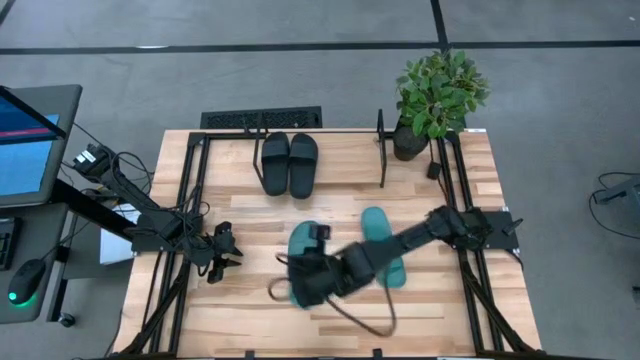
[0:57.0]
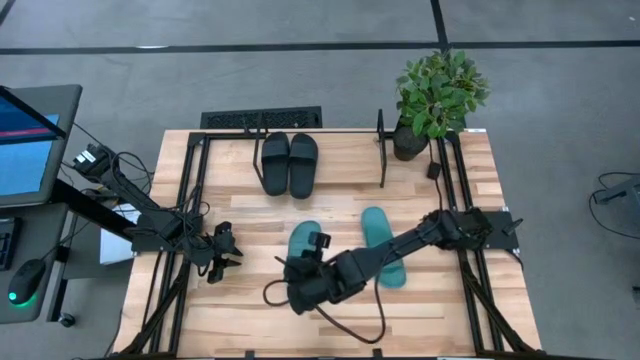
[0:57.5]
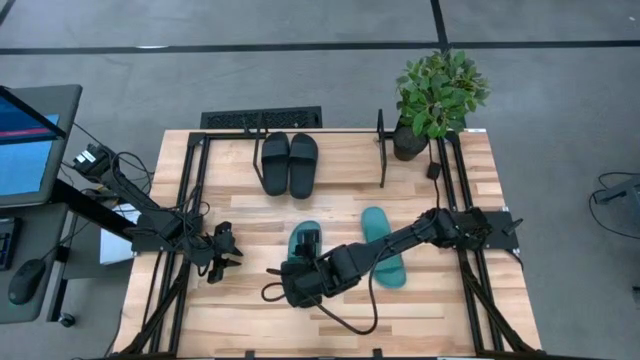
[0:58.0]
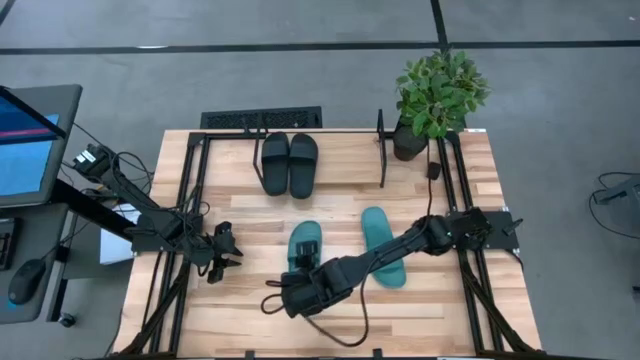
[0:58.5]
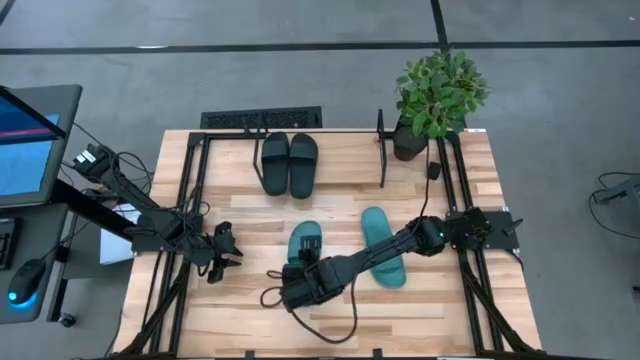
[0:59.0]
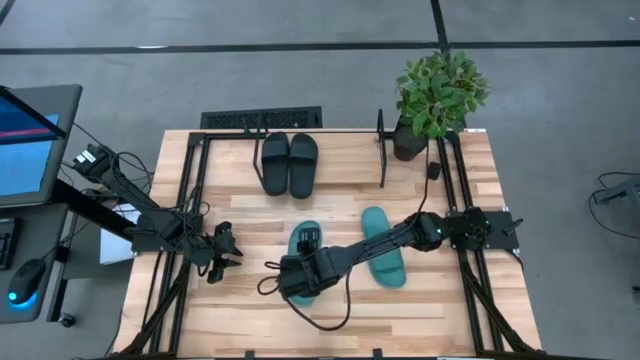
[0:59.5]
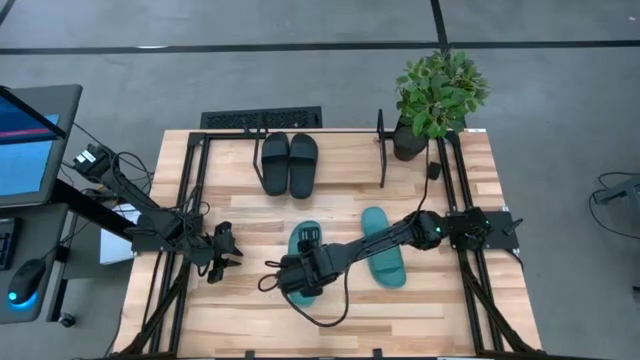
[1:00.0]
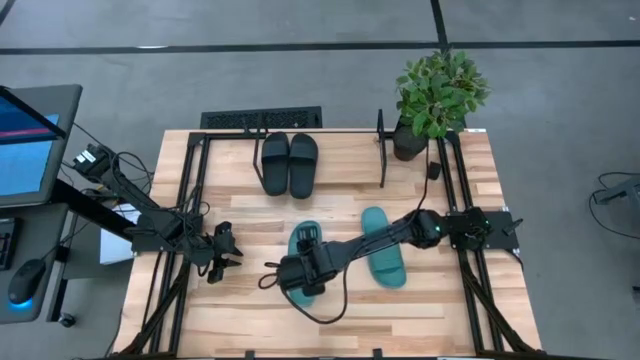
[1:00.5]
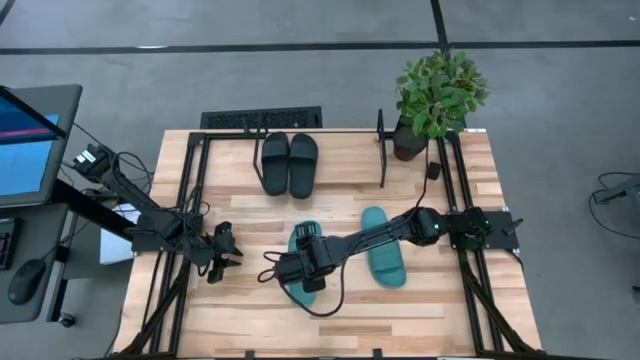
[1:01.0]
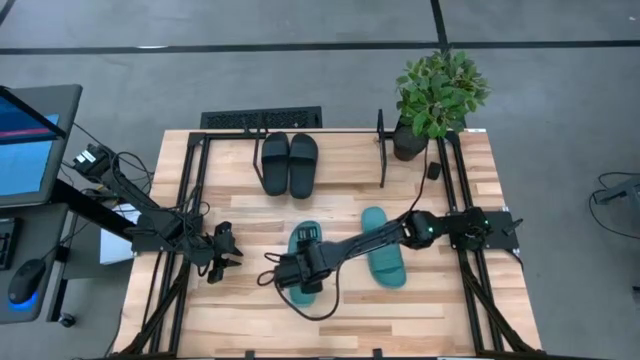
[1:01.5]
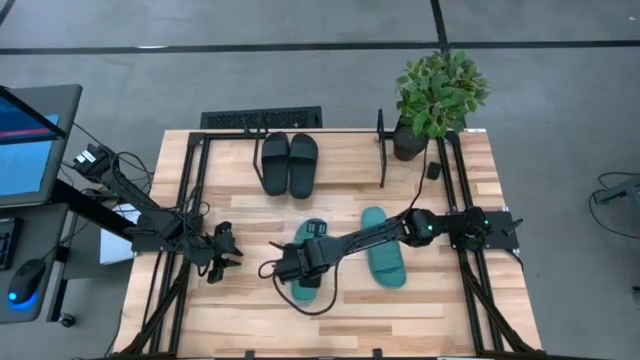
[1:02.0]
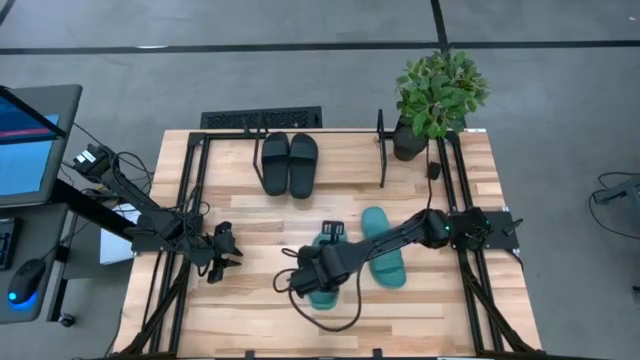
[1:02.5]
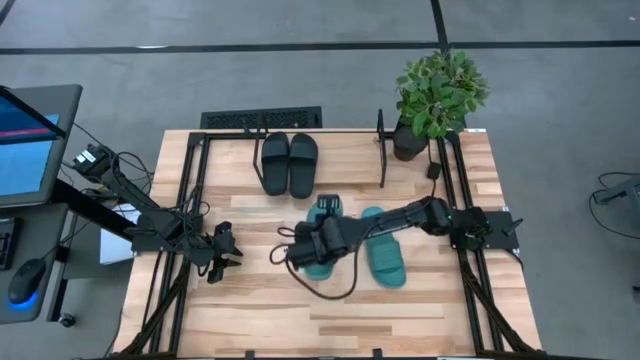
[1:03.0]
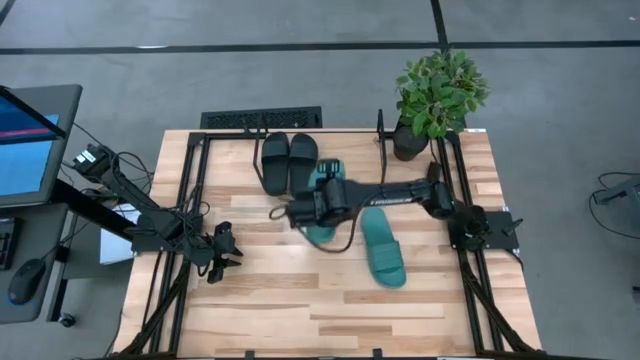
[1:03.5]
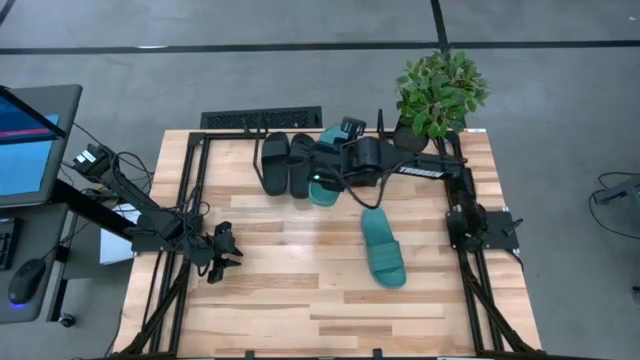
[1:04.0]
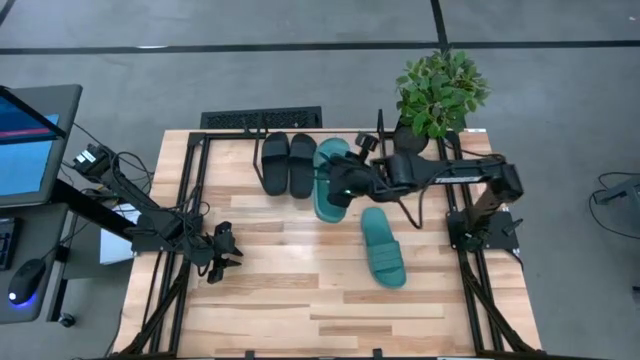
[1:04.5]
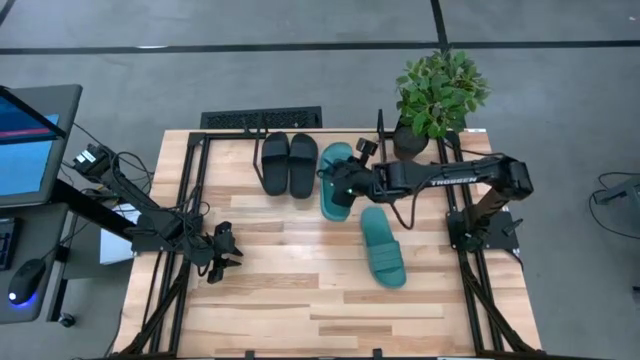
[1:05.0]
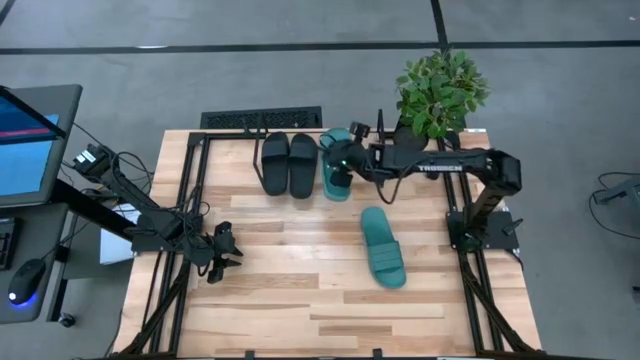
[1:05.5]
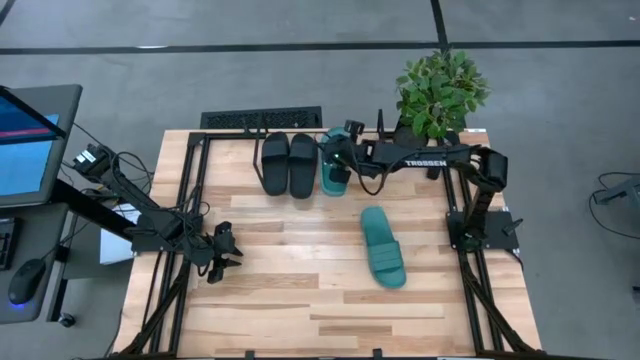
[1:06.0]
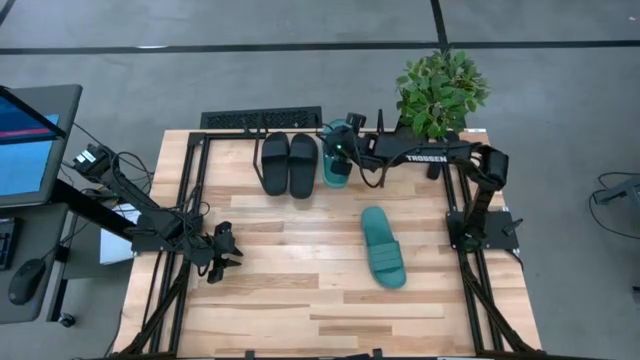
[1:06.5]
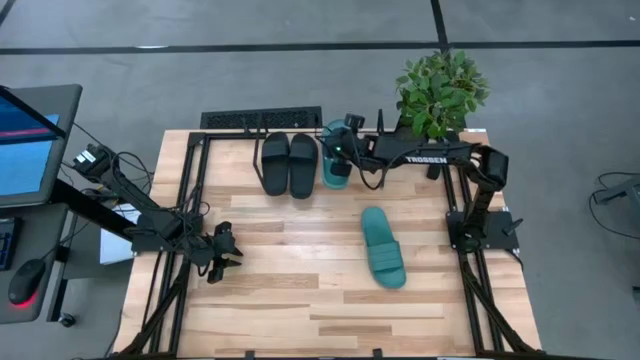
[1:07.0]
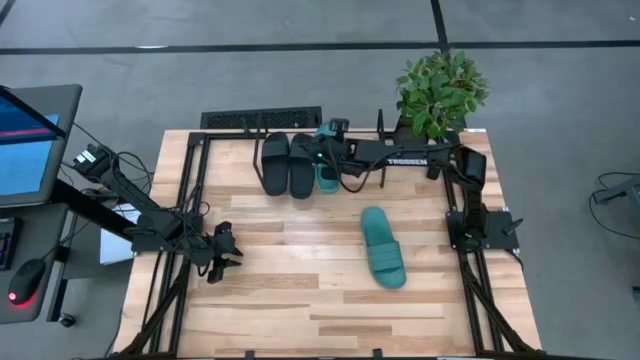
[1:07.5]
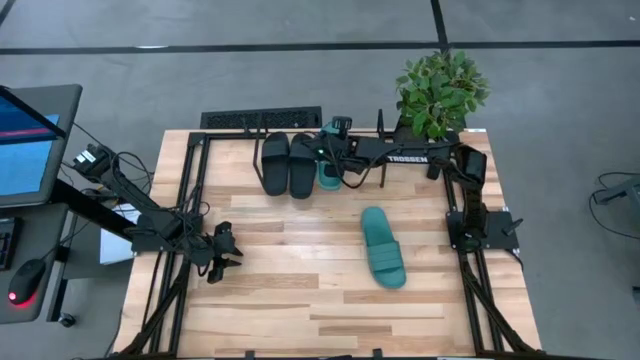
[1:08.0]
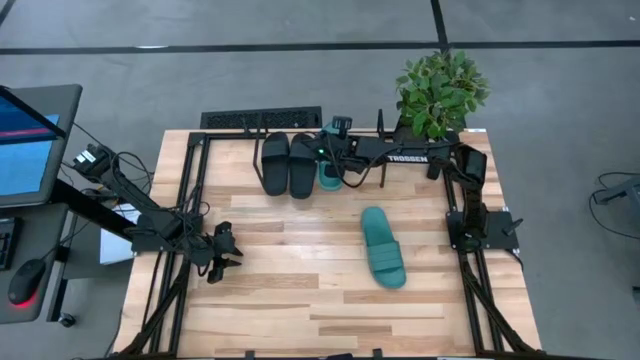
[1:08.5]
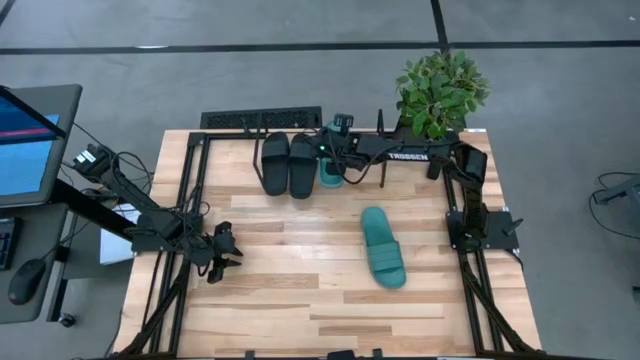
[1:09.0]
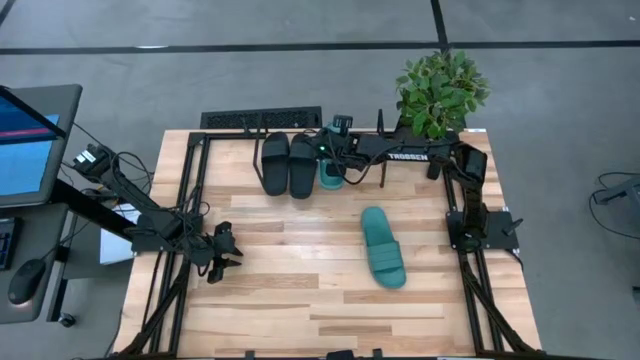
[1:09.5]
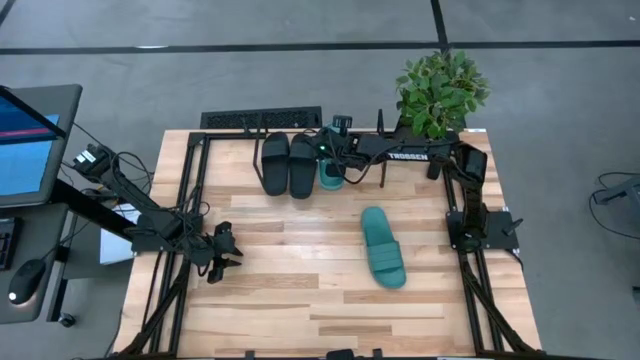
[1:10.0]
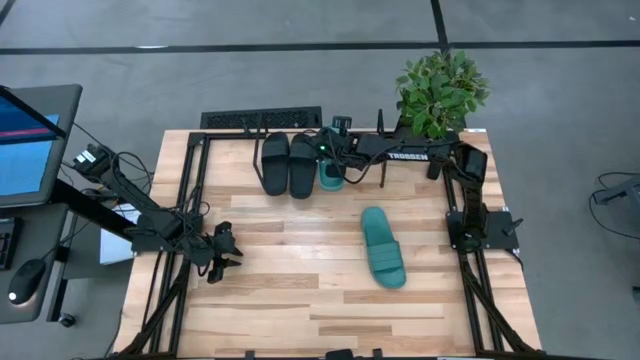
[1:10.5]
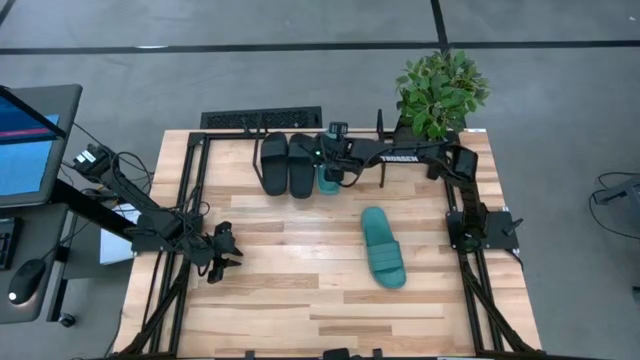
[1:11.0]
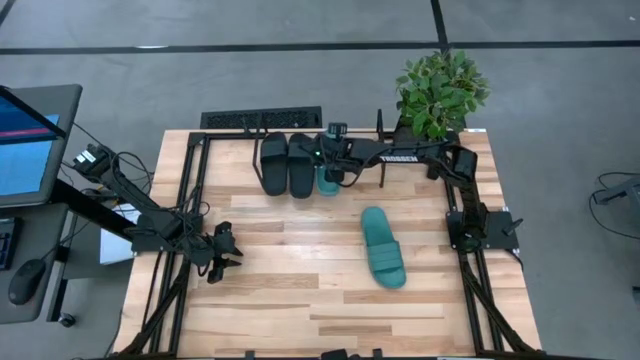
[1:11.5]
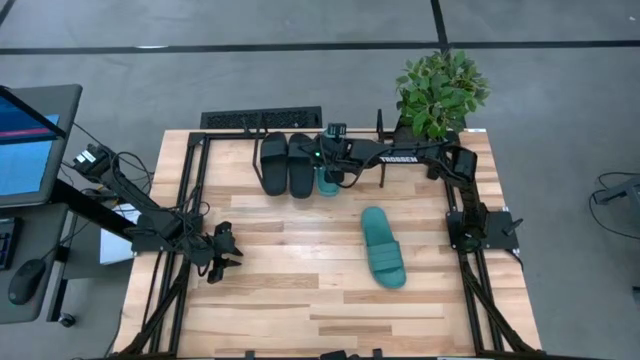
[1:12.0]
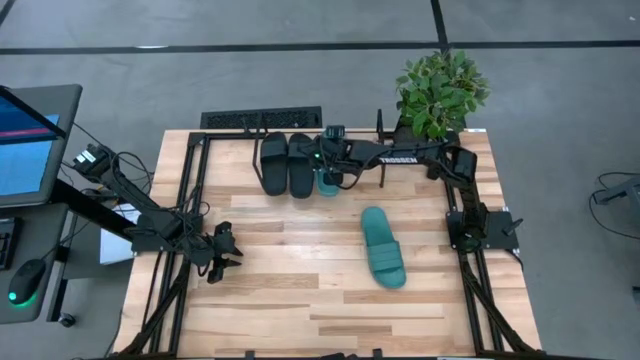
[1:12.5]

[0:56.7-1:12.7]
Task: Pick and place slides into the shelf
Put the left green slide on the shelf

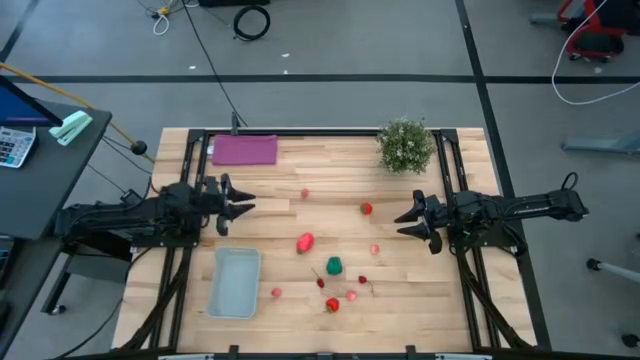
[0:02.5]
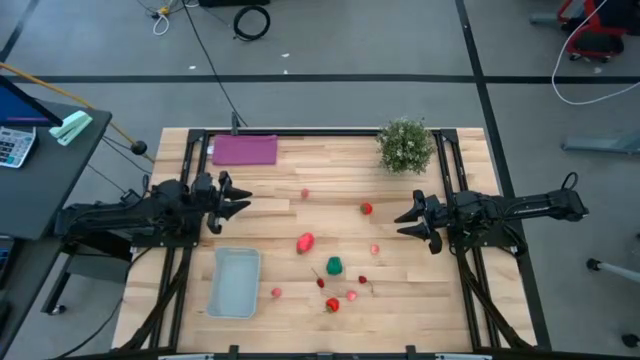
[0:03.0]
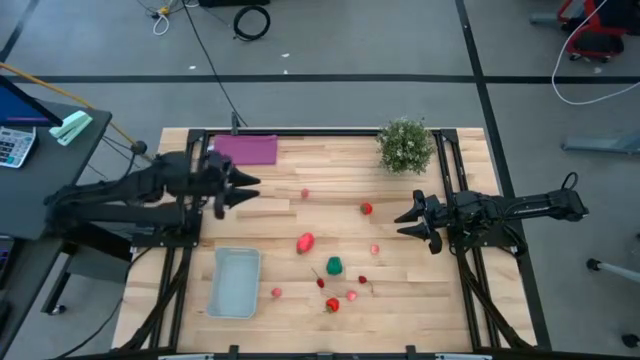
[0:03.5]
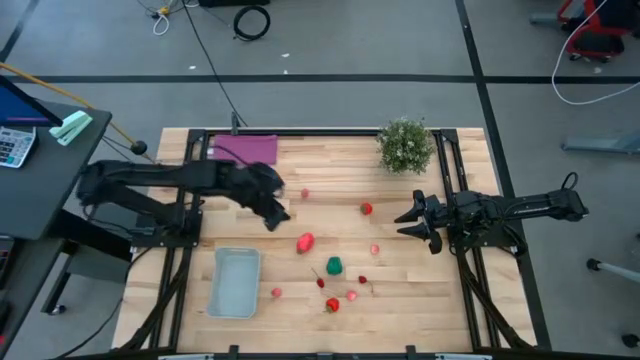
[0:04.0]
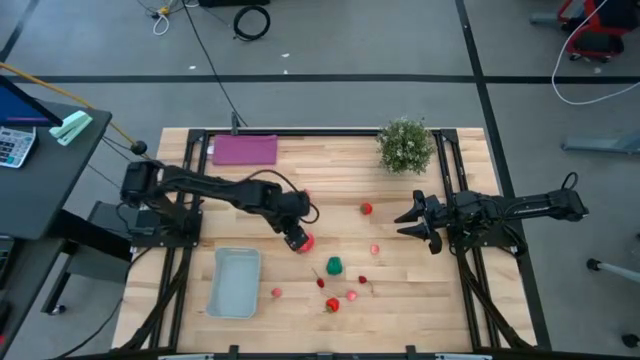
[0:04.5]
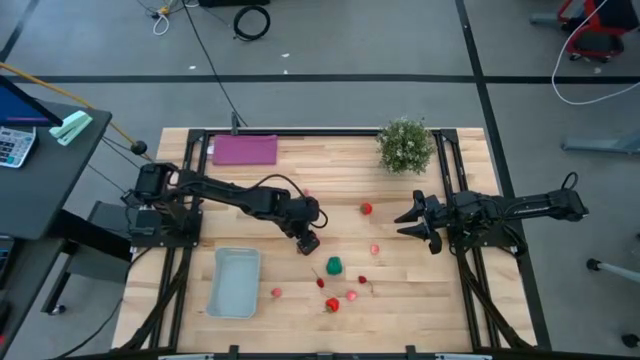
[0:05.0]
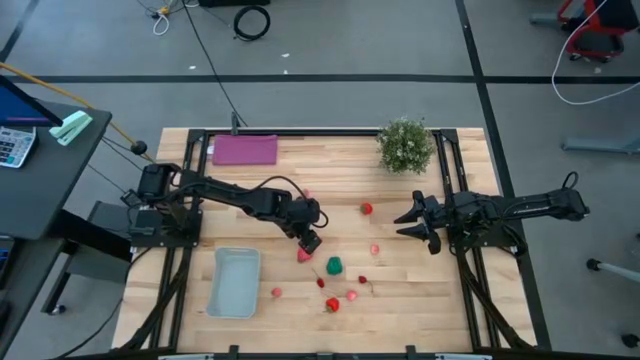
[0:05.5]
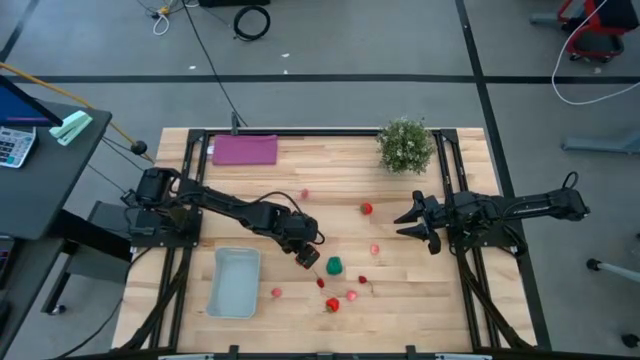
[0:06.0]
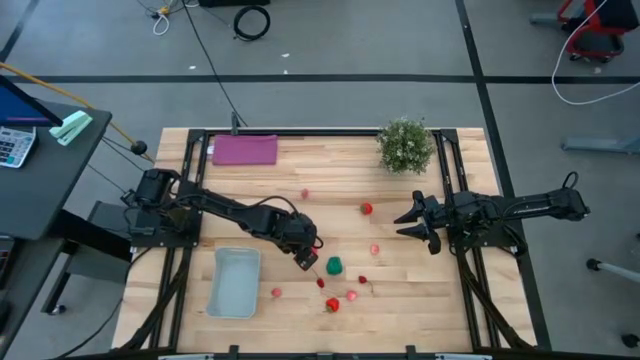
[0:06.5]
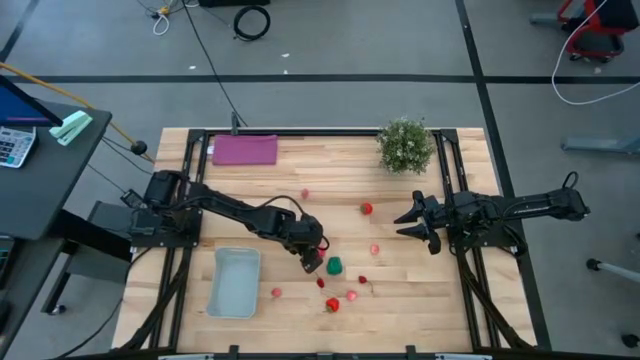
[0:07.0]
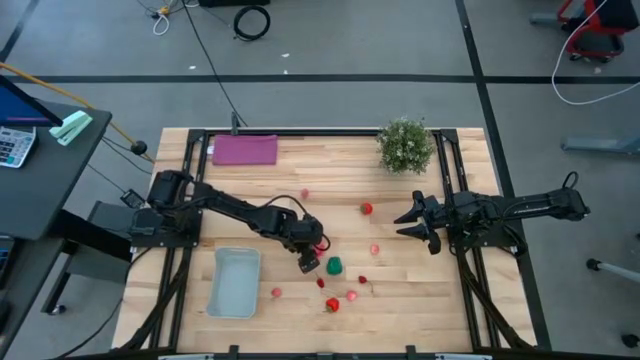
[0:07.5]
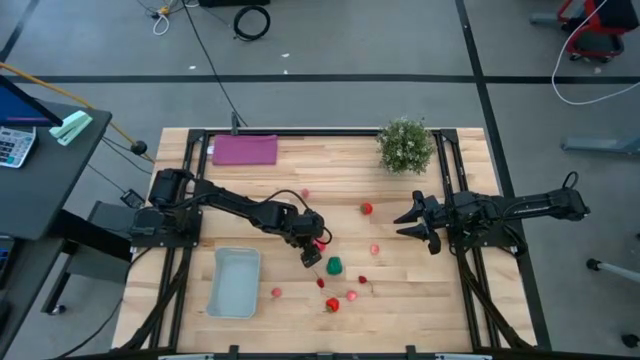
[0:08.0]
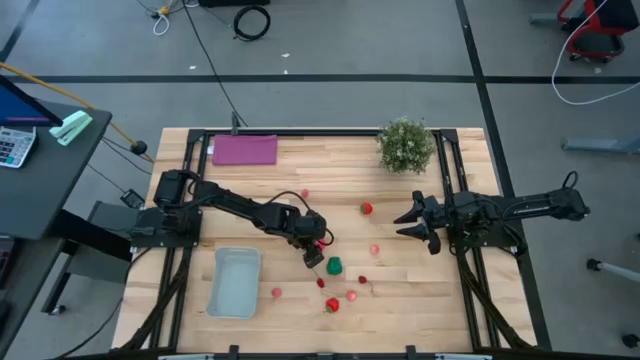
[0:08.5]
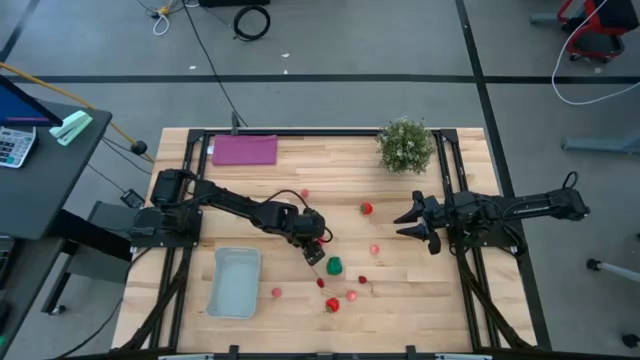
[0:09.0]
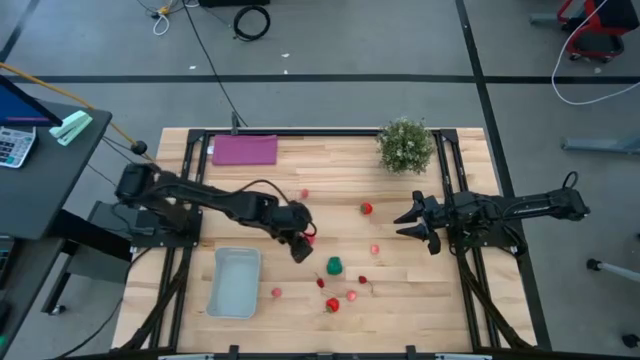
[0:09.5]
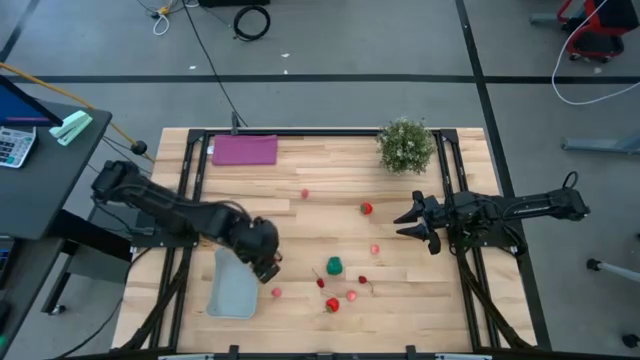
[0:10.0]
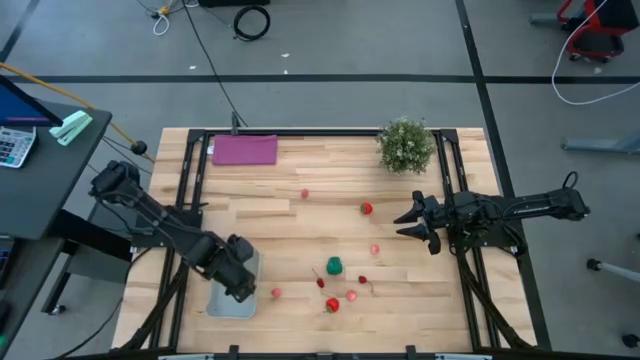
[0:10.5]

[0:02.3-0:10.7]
Task: Pick and placing Produce into tupperware
Put the pink dragonfruit into the gray bin
